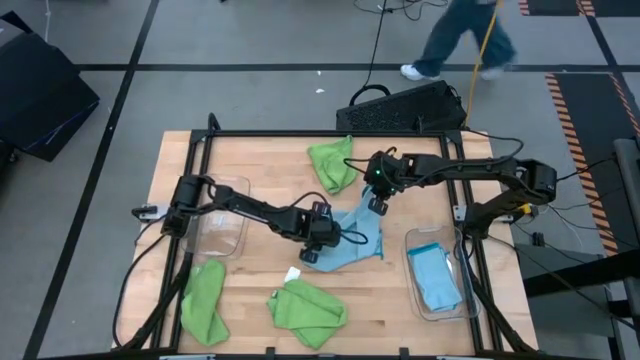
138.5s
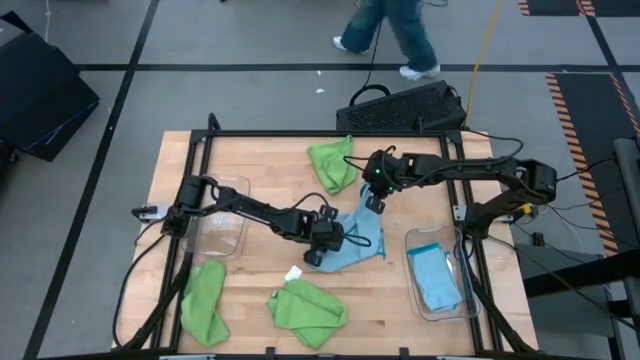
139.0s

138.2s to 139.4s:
Task: Sort microfiber towel by color & place in baskets
Fold the blue microfiber towel

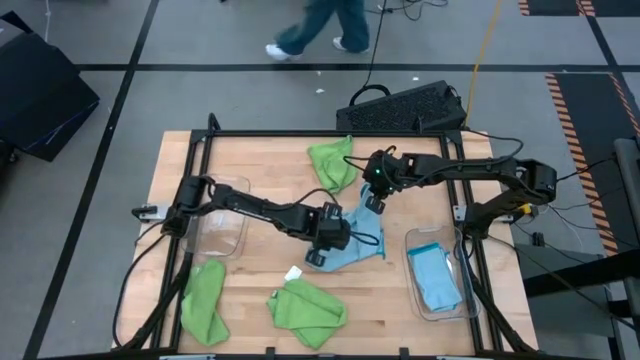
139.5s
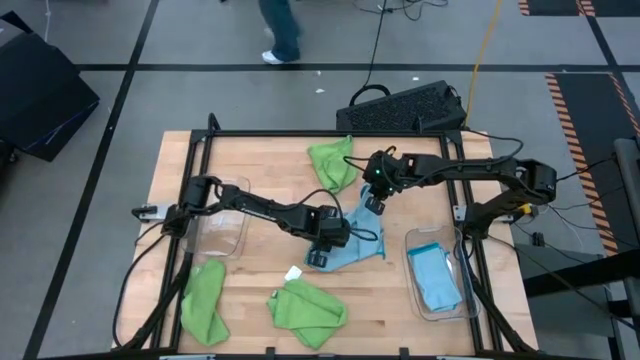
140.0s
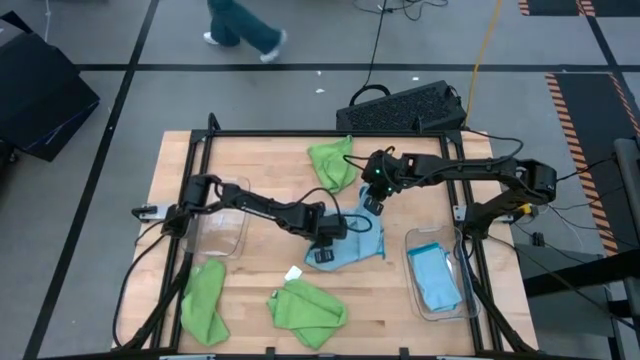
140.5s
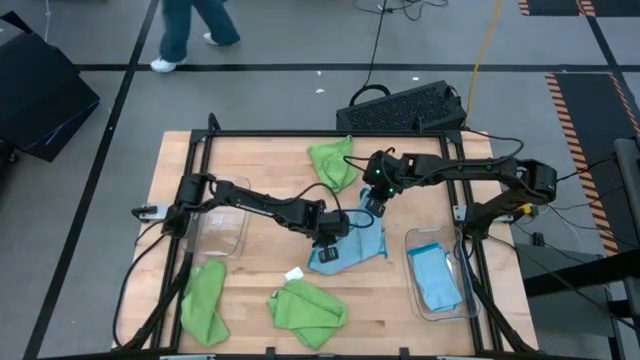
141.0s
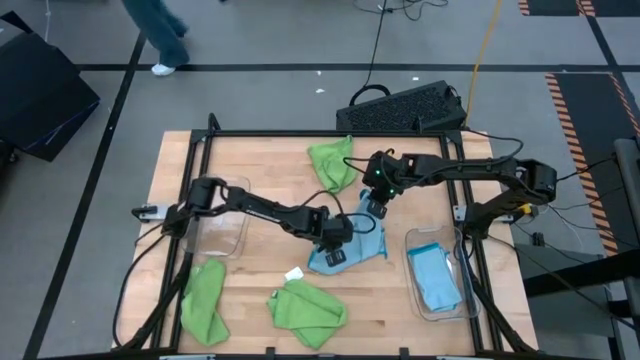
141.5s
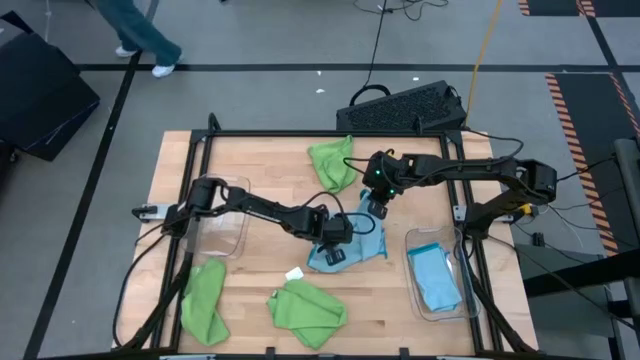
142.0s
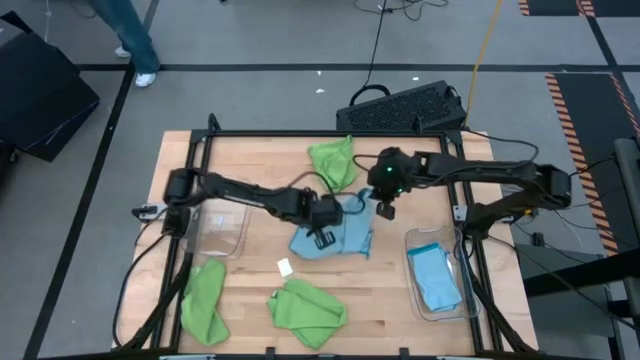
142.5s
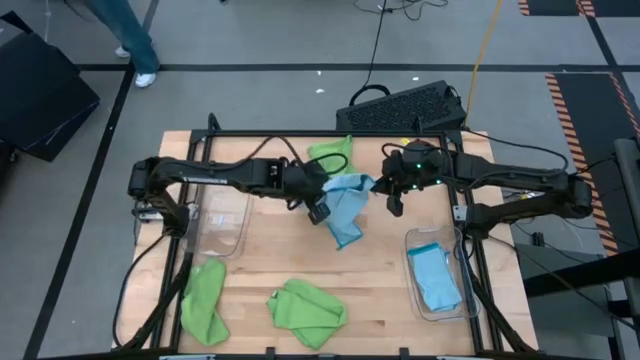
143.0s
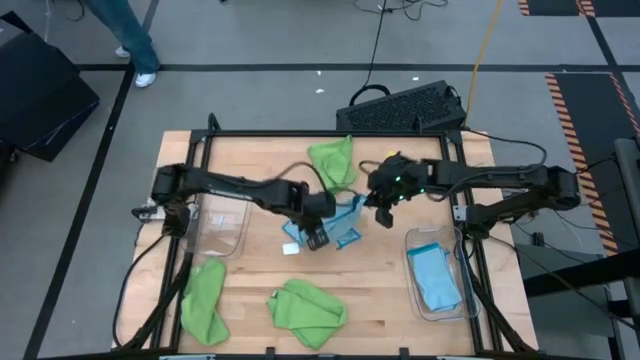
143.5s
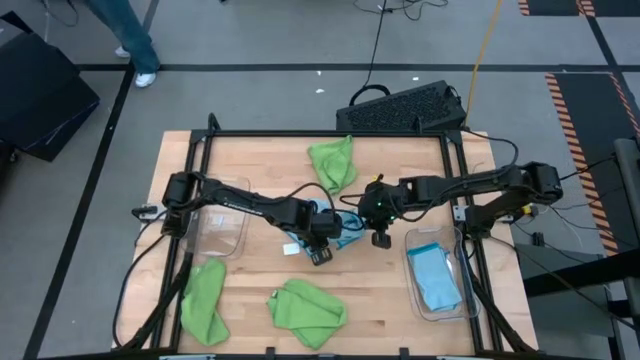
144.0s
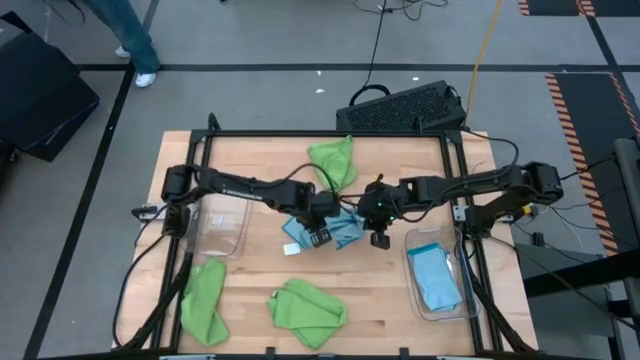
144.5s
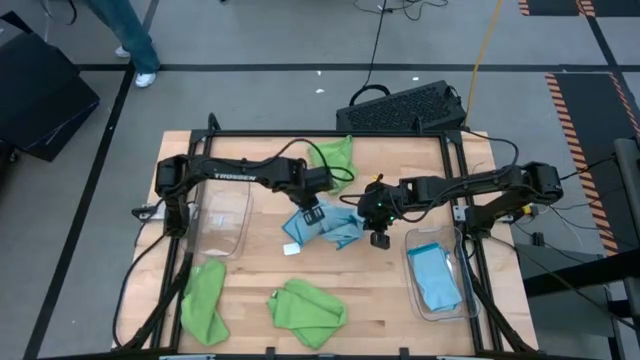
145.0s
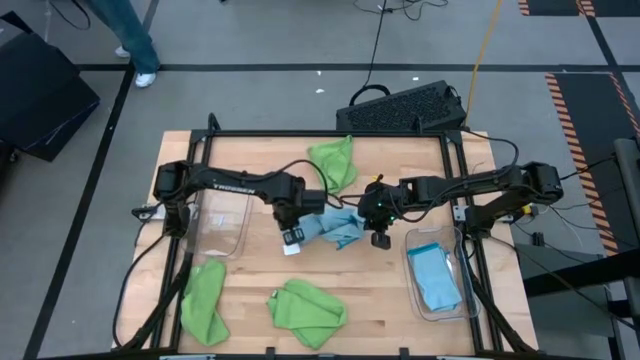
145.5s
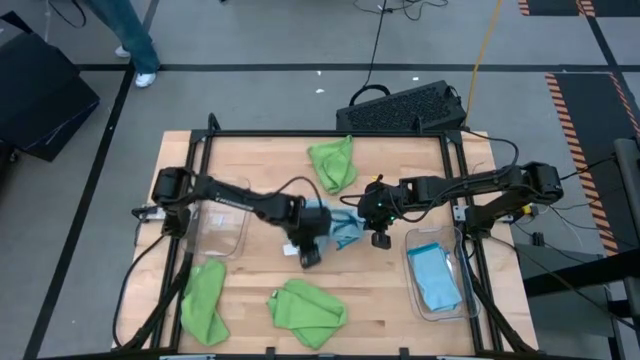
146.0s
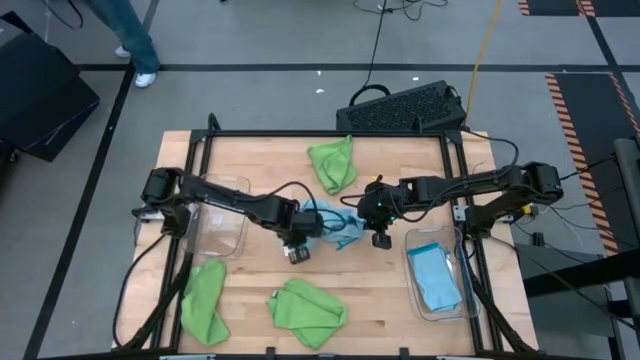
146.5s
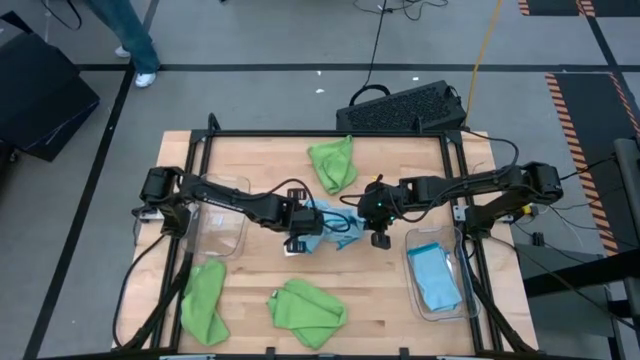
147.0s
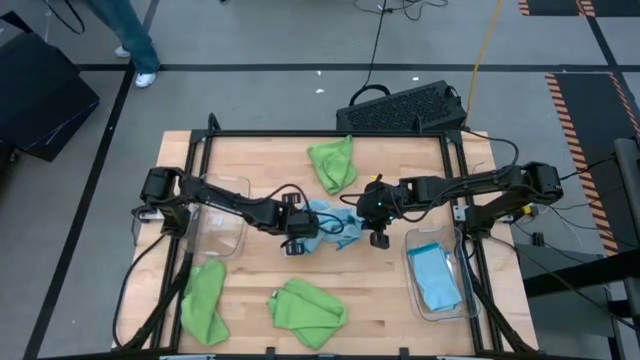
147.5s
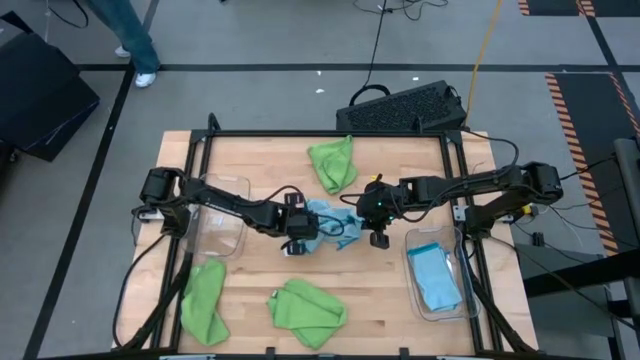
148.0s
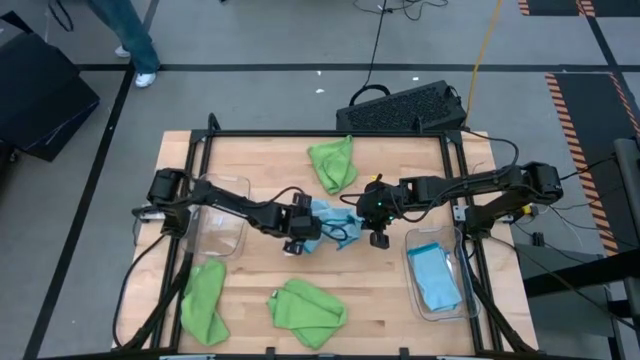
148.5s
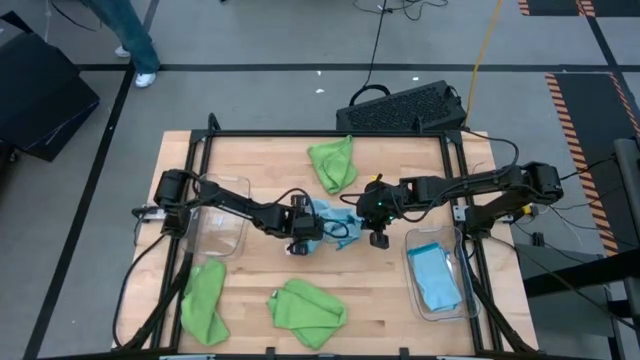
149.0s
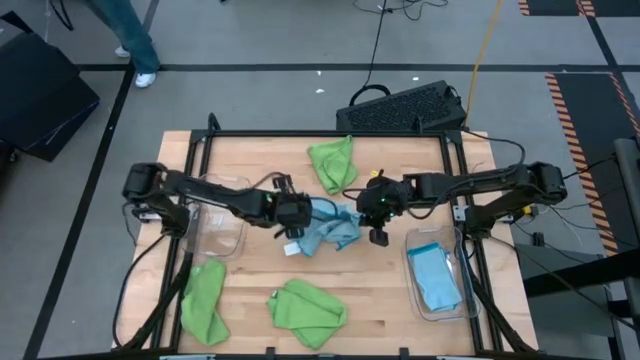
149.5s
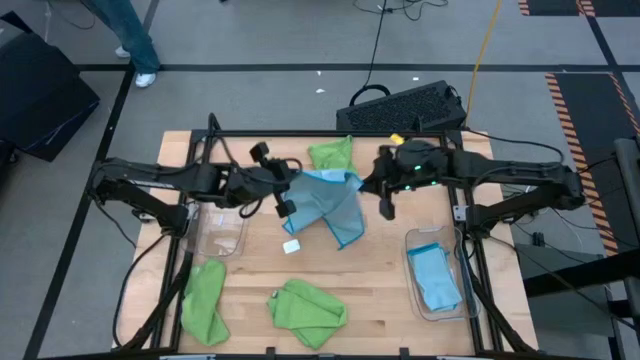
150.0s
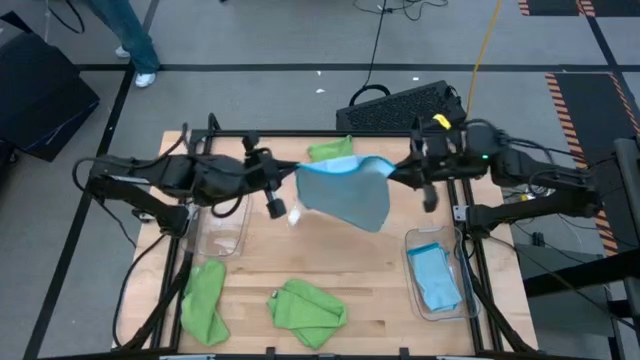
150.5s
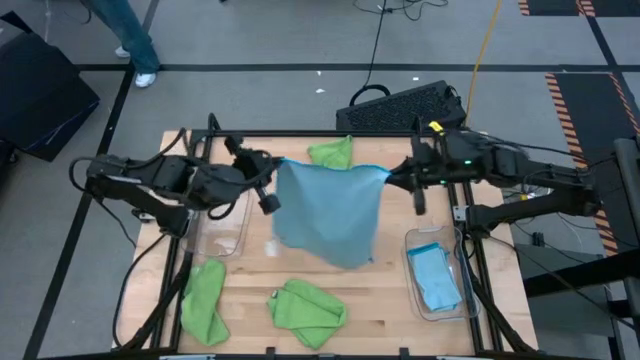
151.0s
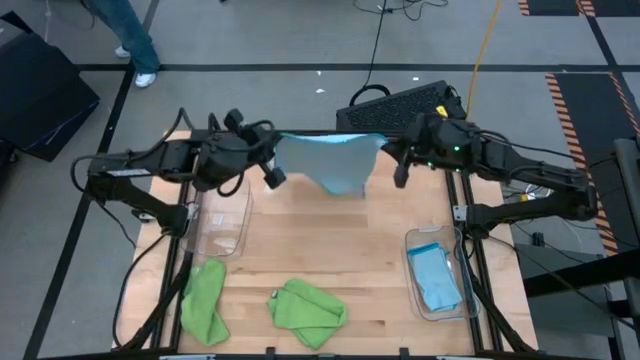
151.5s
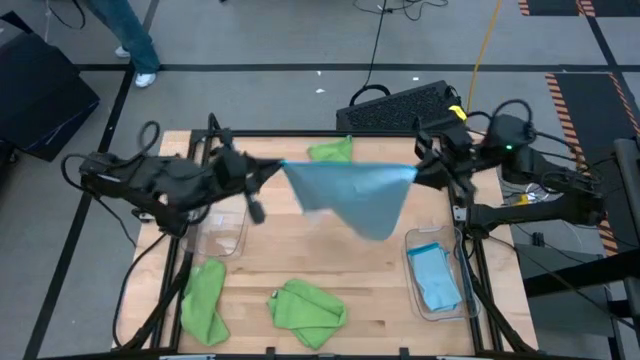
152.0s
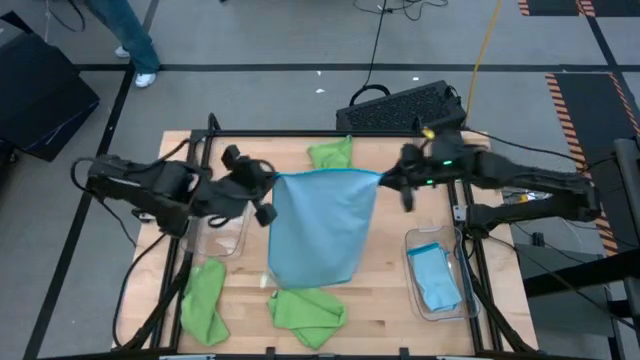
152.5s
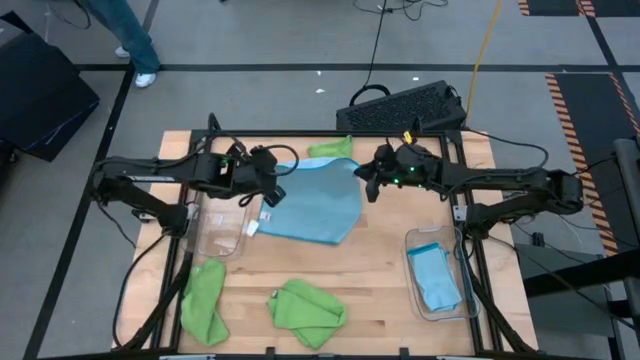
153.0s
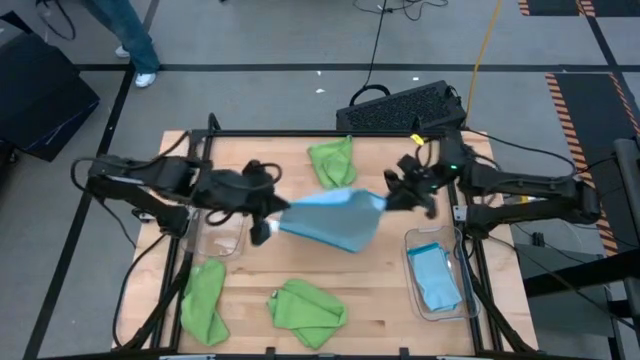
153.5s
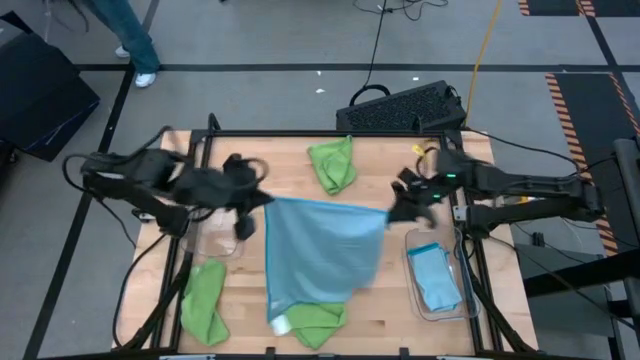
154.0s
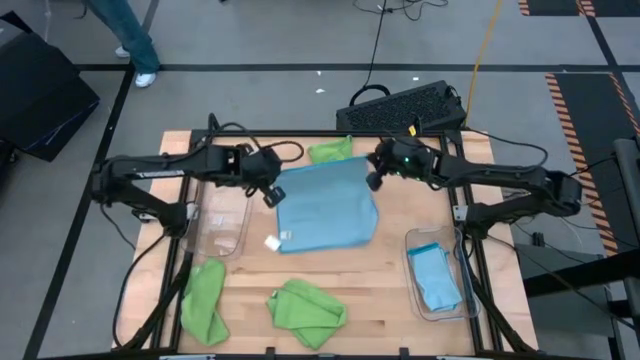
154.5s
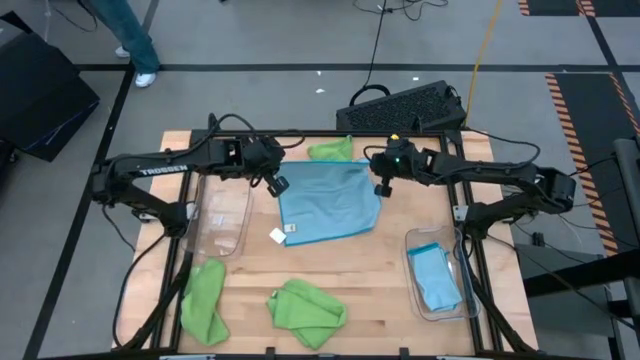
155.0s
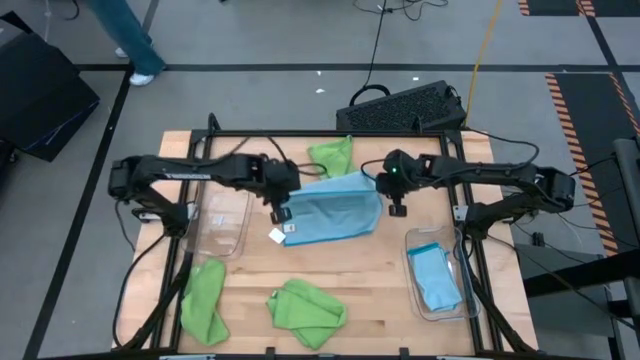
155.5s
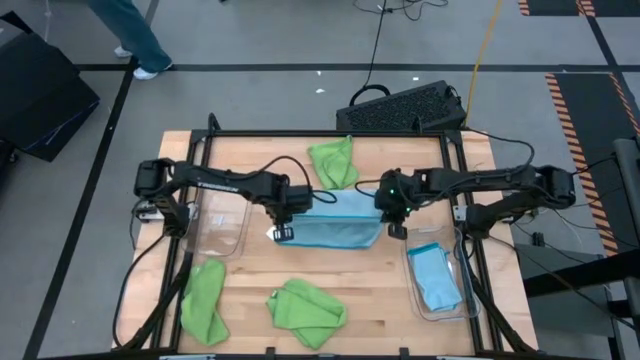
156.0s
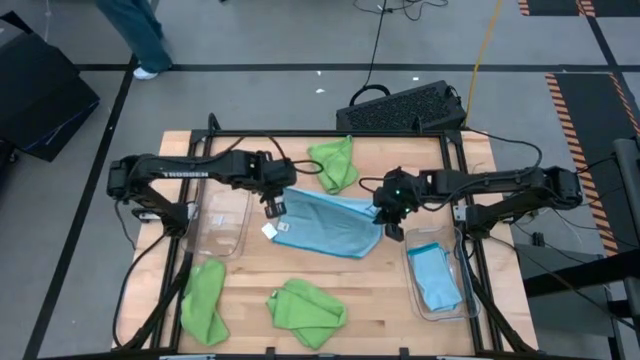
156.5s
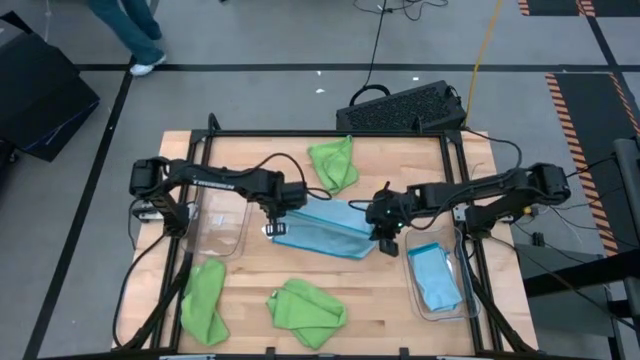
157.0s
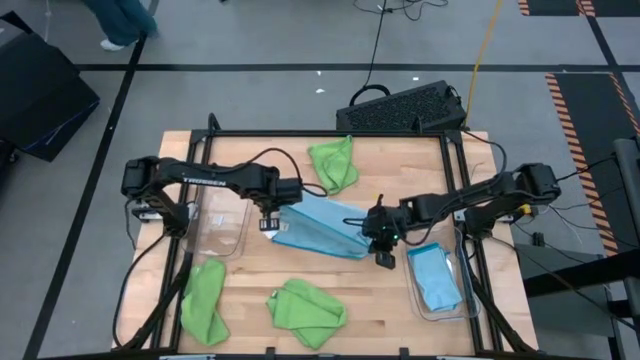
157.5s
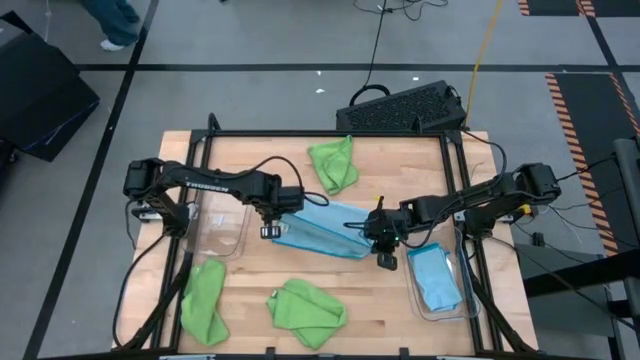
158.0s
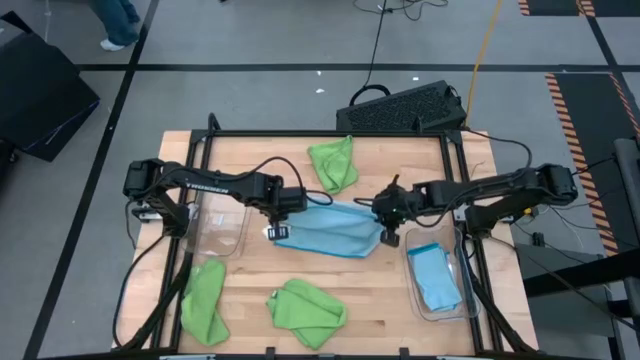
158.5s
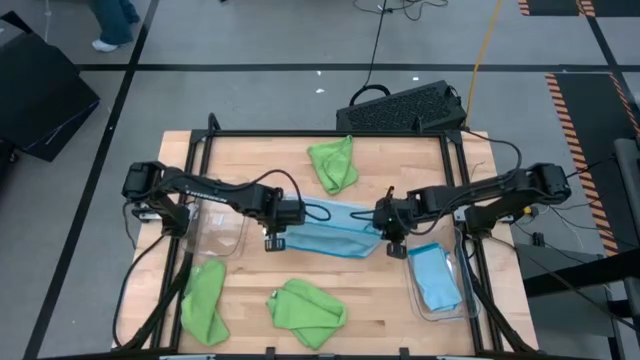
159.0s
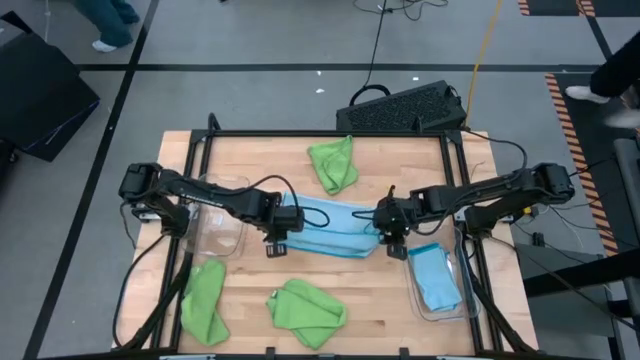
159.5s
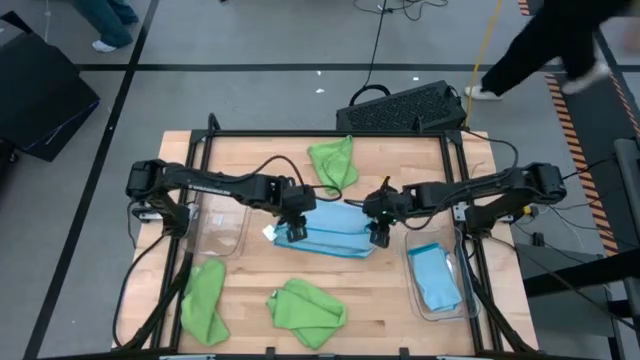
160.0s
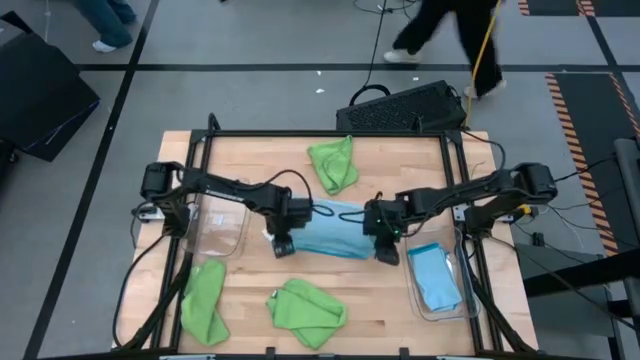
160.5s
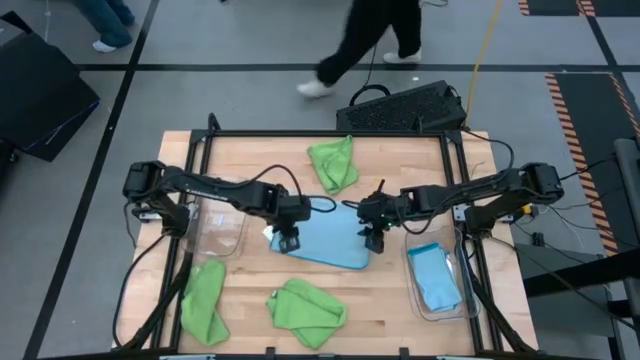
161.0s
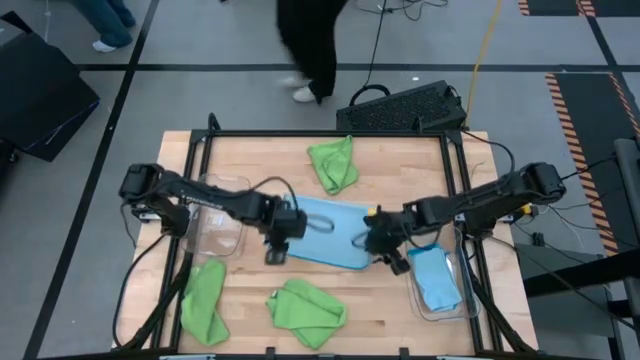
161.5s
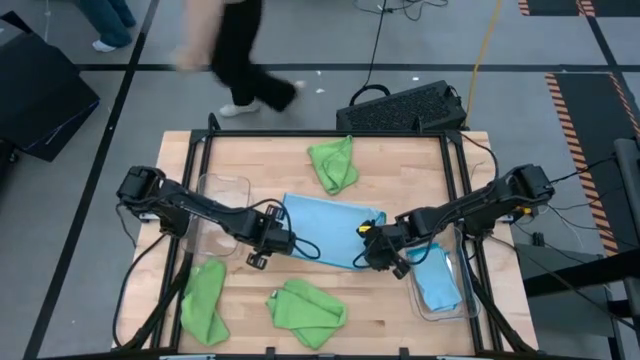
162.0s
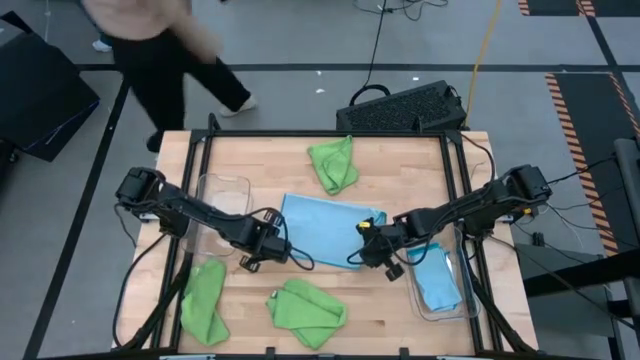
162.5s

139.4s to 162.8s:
Fold the blue microfiber towel
